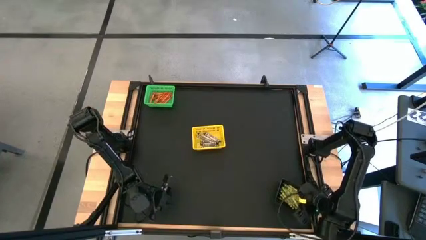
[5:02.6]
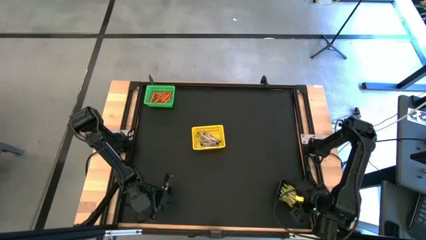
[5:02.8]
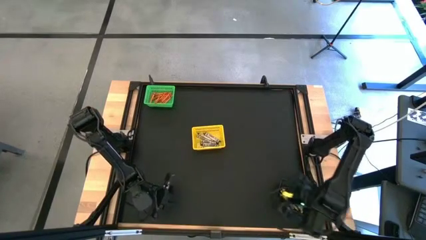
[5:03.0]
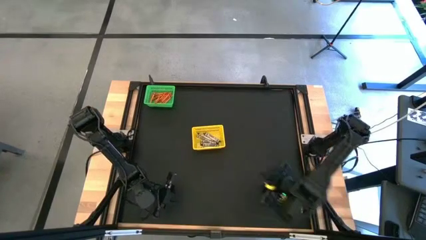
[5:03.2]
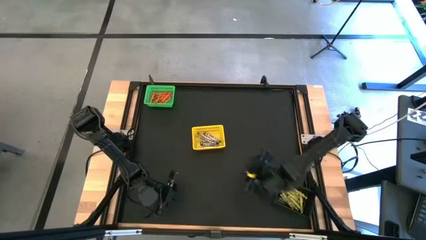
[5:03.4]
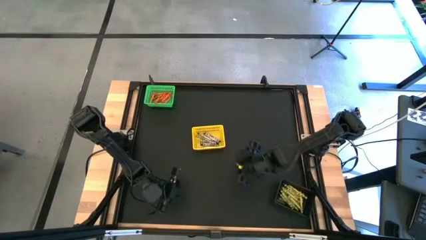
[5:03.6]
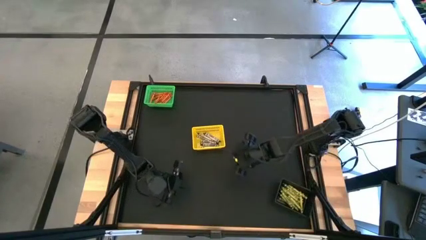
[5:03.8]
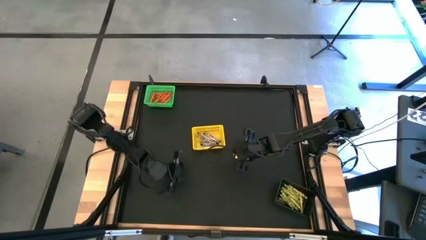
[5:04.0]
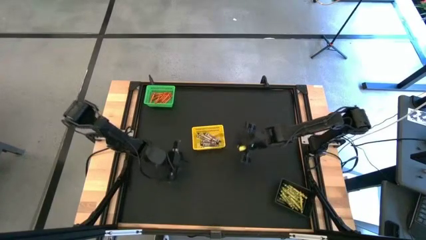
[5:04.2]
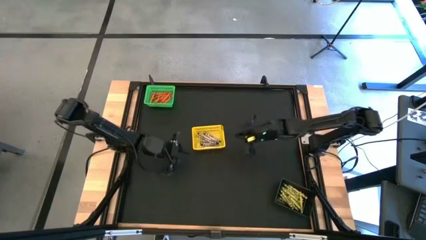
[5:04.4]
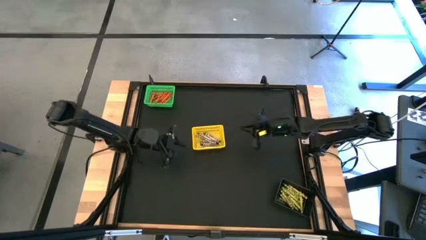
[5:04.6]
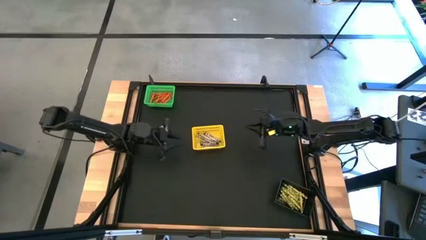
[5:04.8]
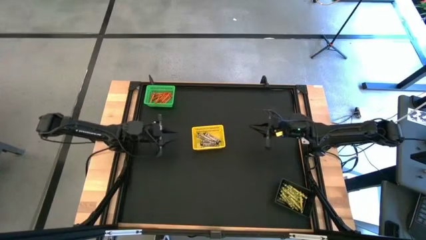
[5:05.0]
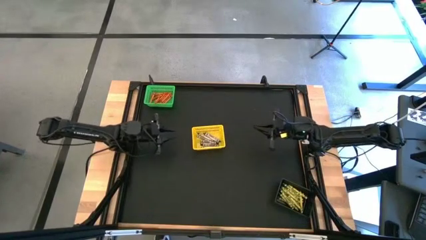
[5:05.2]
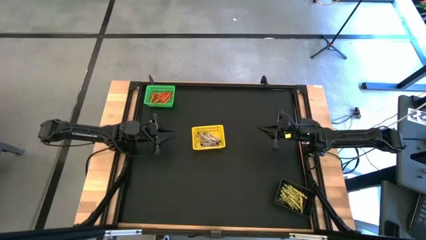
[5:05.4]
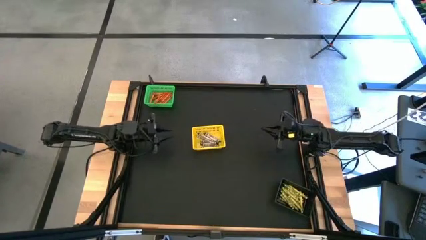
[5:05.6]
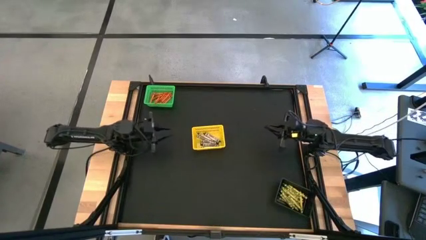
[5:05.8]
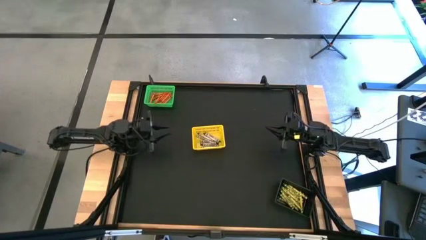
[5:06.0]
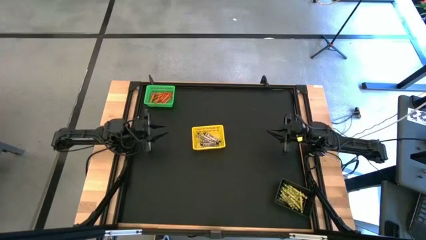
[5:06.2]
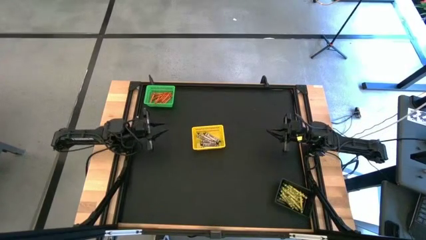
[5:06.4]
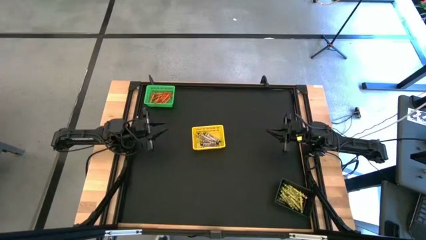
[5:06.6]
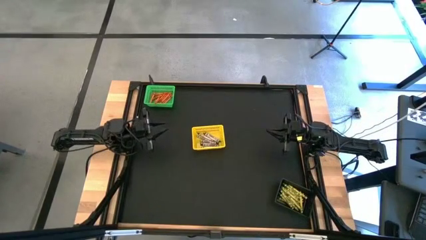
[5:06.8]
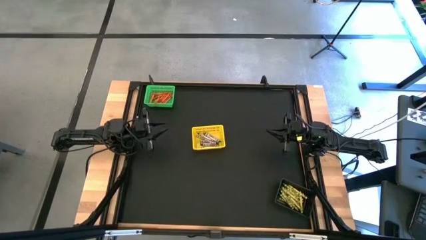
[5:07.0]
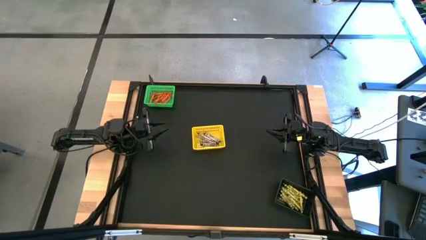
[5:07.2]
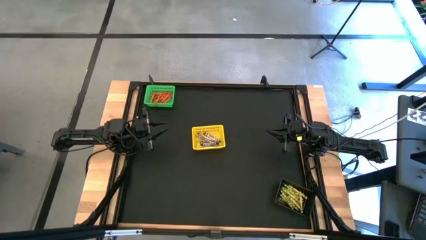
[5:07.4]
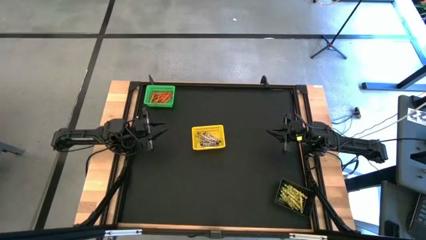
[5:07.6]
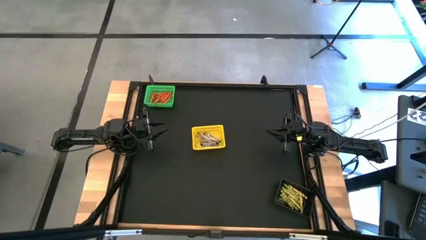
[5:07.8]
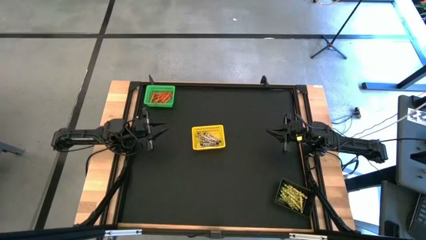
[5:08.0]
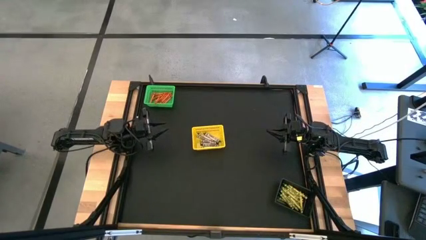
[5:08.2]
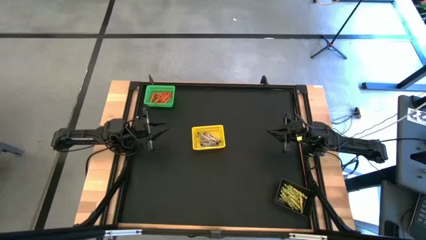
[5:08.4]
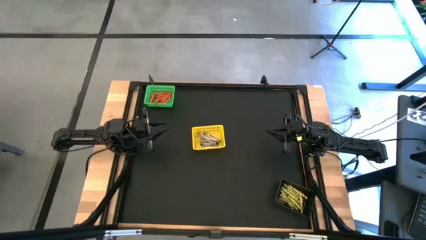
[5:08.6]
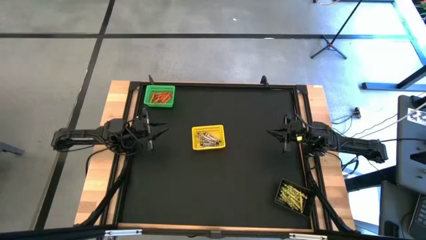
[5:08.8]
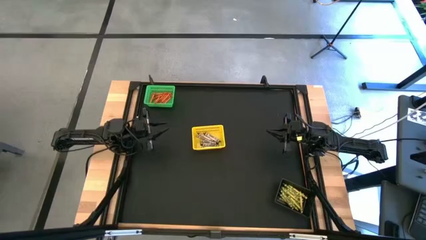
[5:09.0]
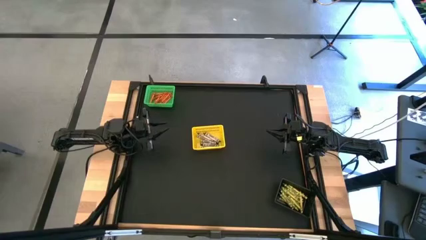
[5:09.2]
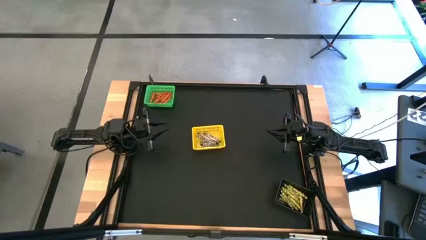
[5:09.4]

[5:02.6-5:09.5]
Task: Sort crayons
Return to Home Position

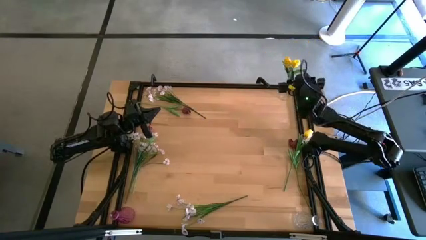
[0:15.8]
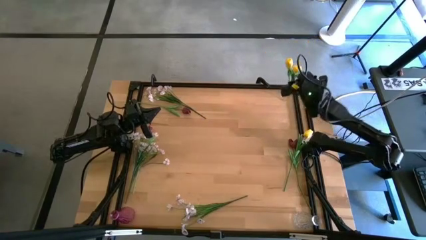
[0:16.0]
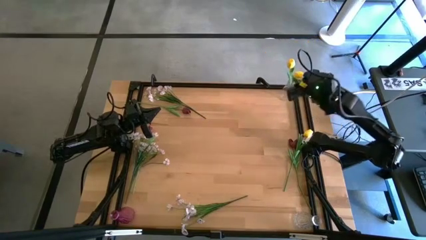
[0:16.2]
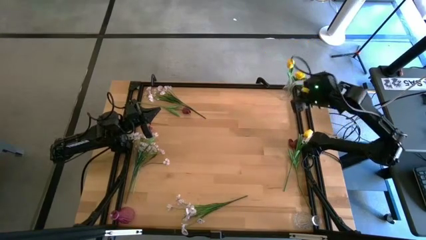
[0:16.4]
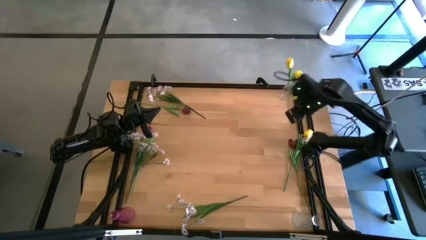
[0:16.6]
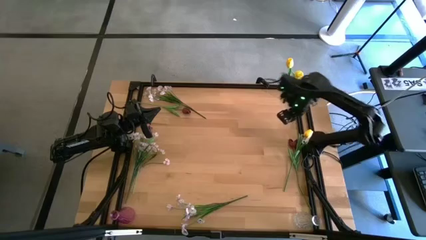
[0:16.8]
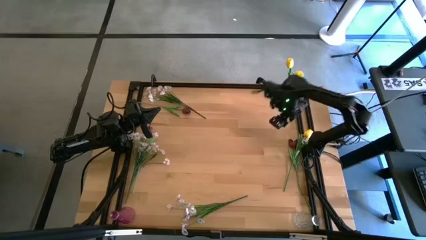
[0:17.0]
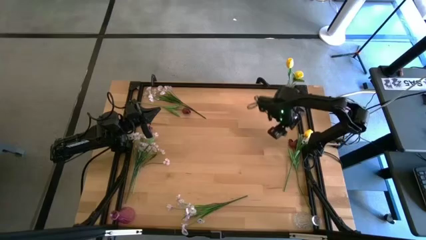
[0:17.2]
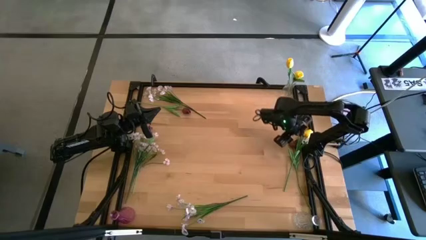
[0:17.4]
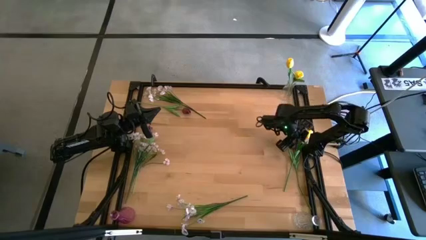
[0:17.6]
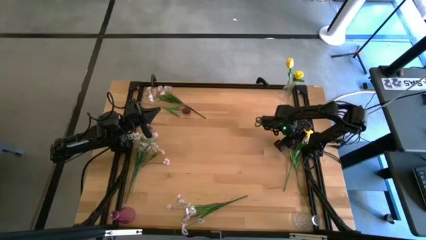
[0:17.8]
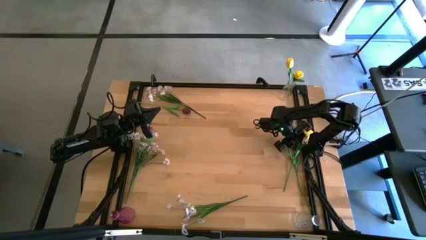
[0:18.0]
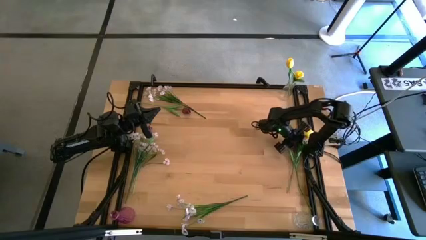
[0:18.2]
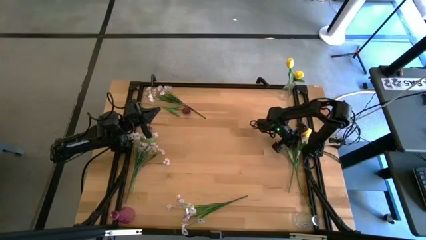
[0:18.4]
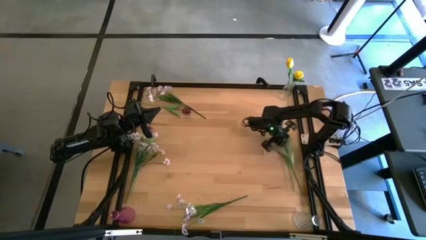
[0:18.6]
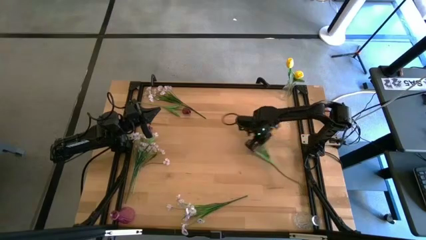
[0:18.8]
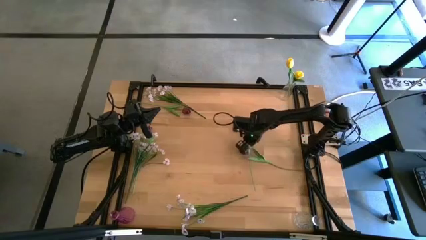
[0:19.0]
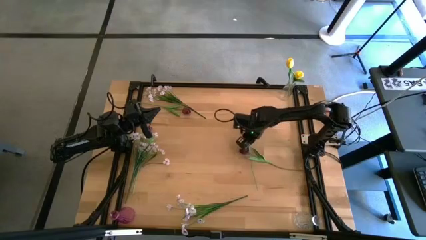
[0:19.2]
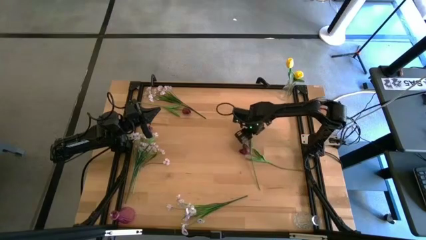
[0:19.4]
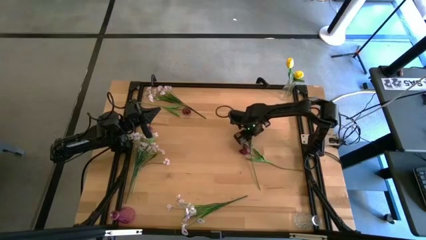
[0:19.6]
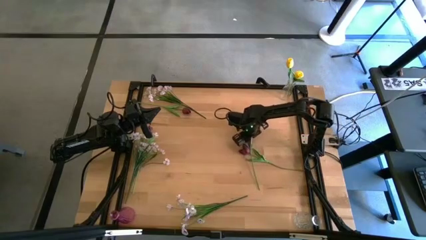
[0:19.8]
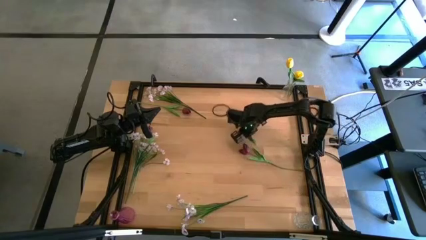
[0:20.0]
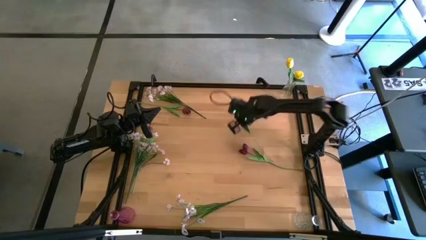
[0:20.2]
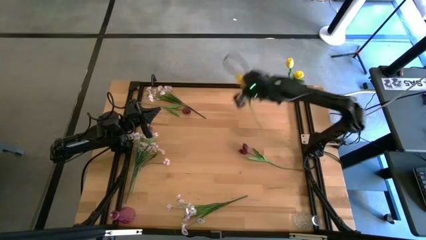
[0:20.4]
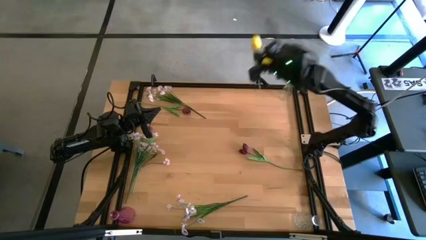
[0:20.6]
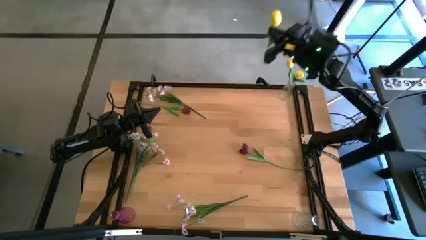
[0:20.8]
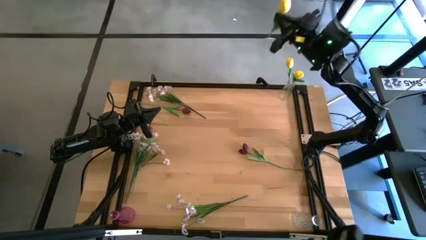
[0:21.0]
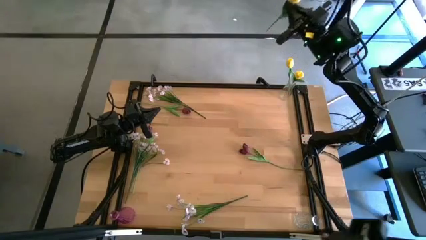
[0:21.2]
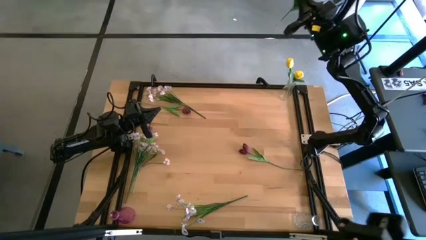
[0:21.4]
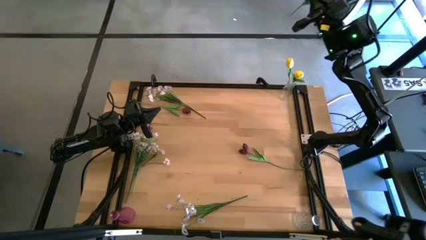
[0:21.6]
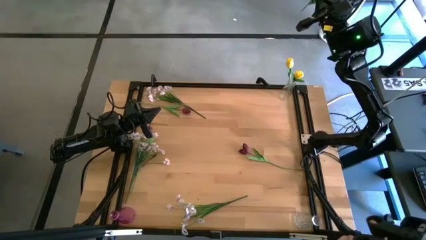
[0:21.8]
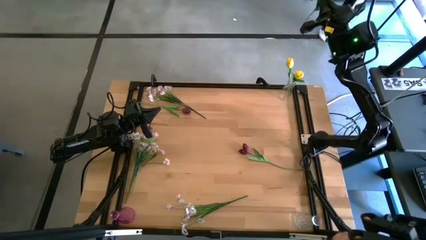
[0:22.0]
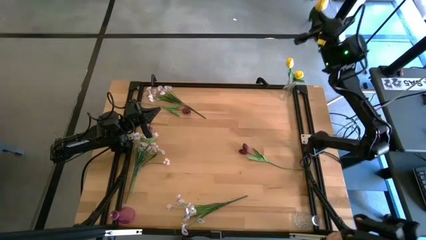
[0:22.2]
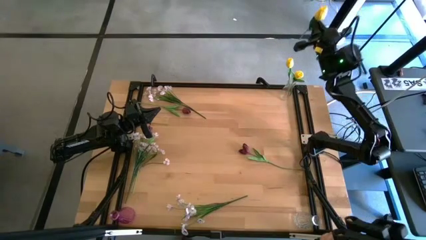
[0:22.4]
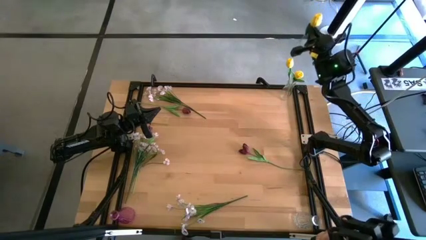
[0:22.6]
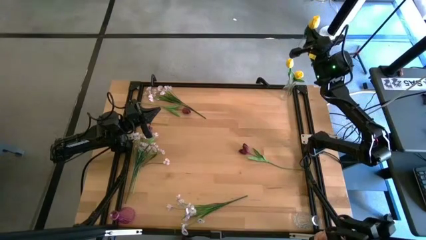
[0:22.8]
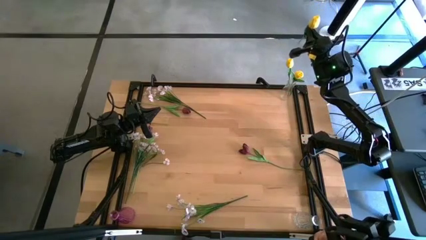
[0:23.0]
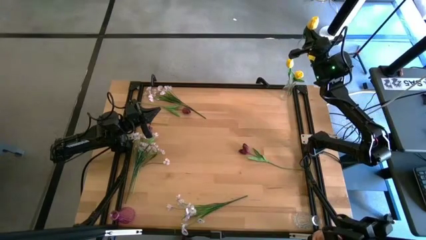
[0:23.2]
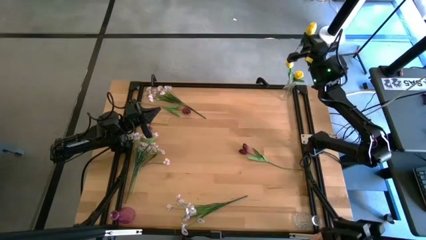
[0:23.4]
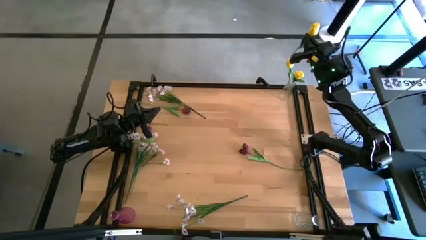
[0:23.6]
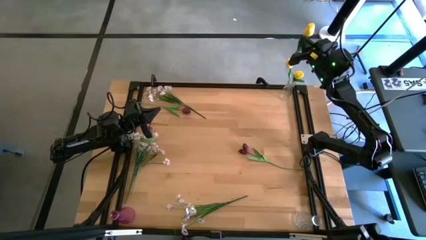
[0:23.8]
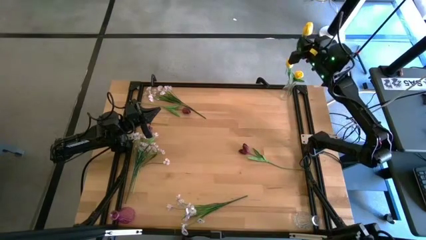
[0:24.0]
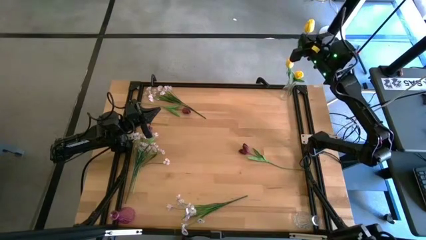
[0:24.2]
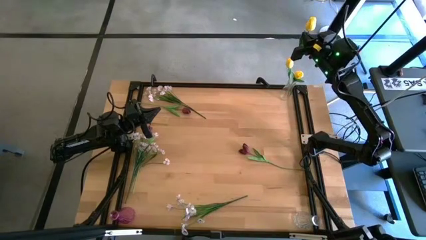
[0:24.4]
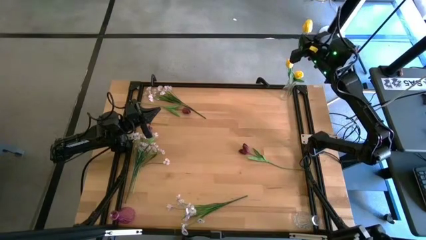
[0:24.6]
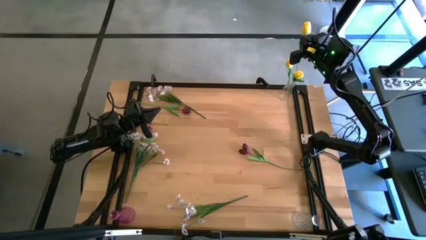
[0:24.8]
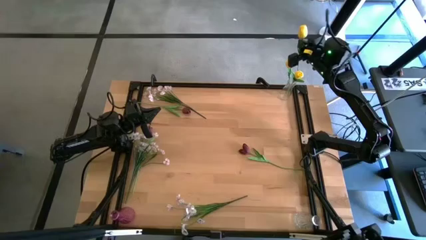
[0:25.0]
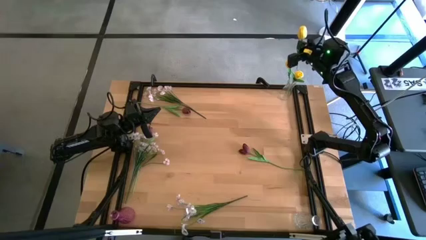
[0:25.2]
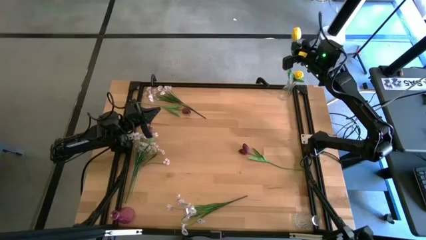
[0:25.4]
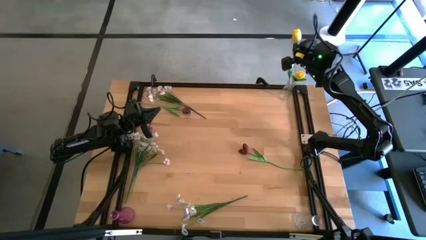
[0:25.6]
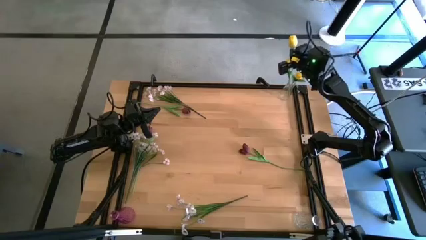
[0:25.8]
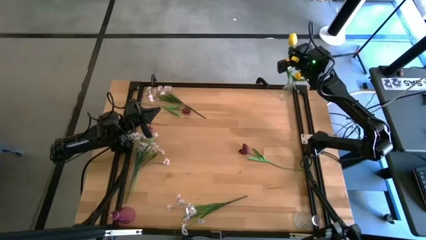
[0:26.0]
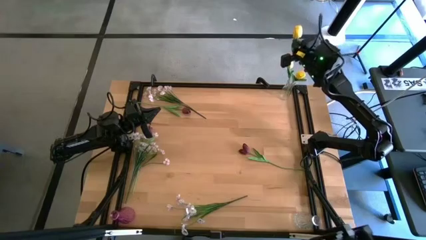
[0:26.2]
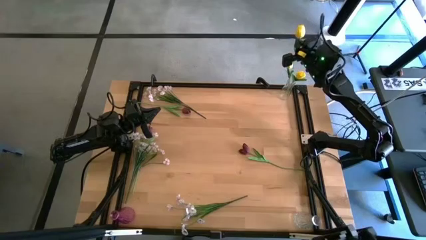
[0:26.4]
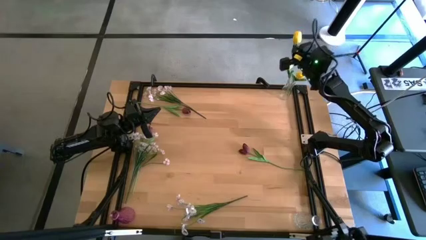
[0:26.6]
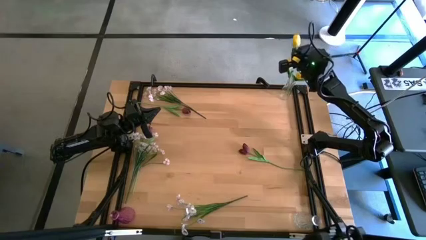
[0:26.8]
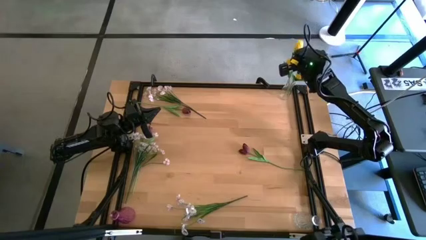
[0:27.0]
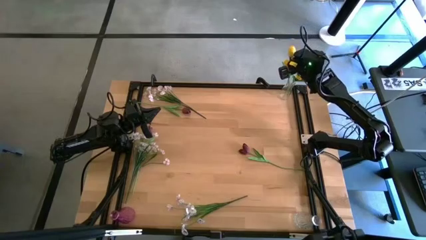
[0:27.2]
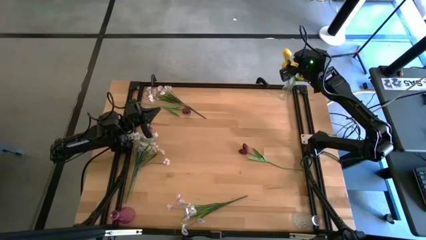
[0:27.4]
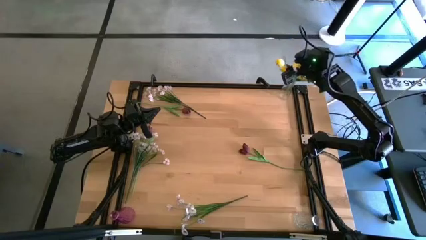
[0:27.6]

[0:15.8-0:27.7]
Task: Sort flowers into vase by color
Put the yellow tulip into the glass vase
